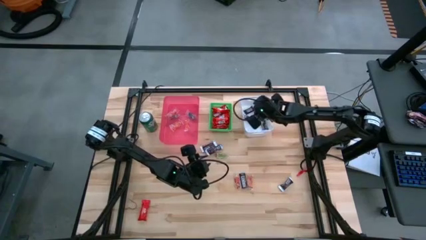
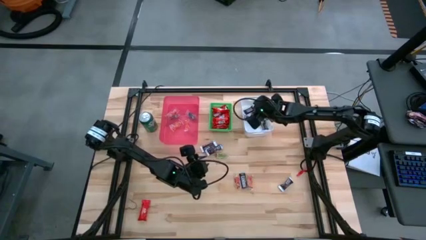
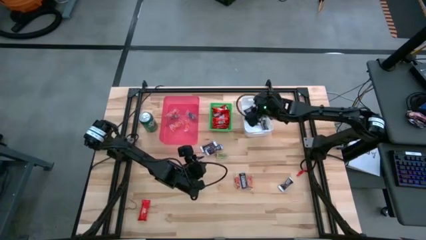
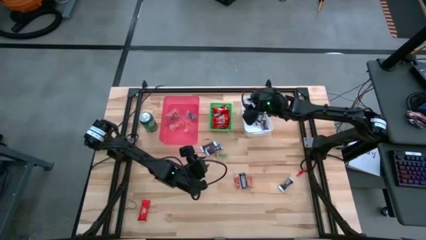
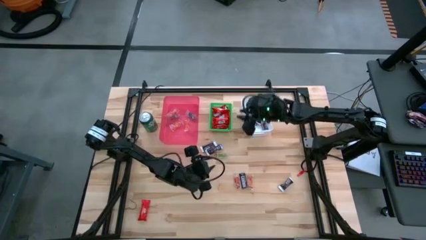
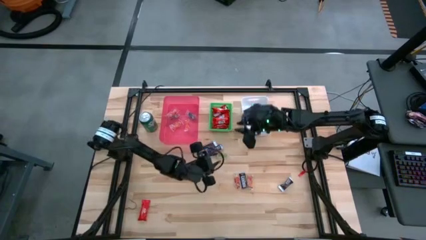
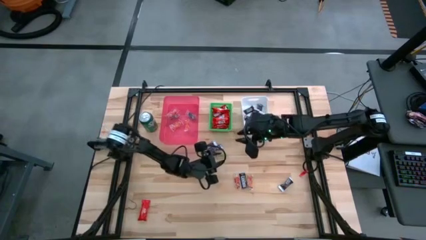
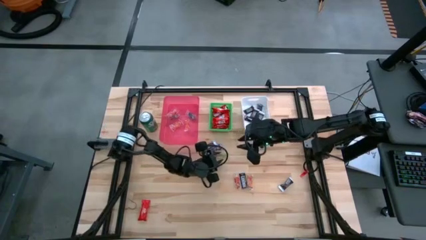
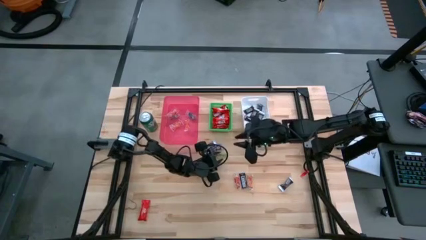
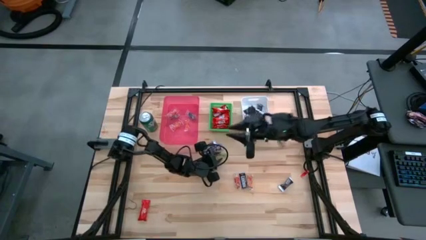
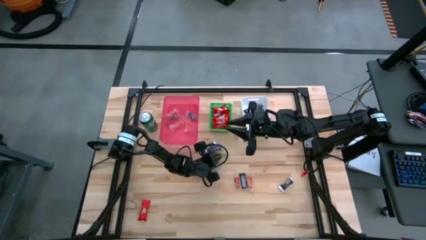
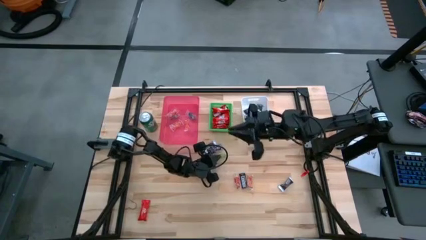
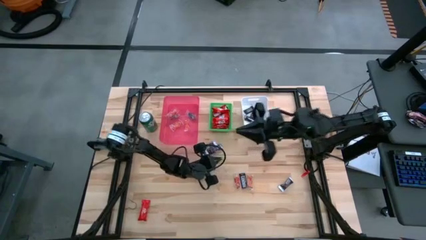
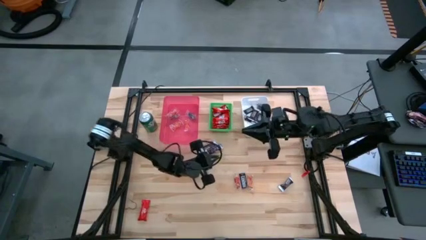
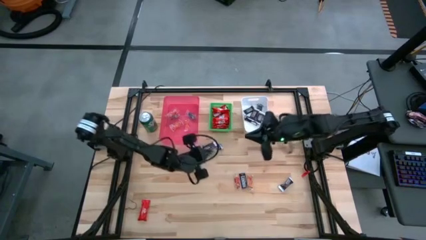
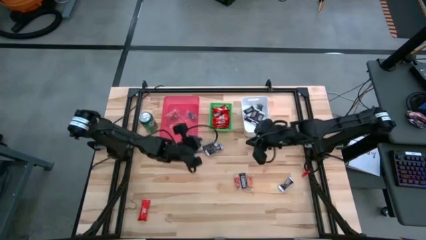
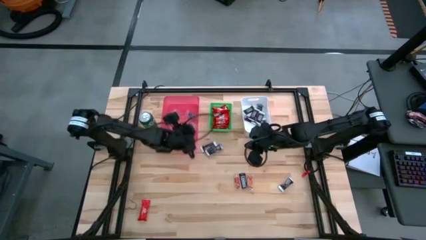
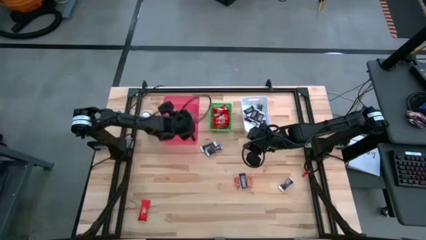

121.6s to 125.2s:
Task: Sort candy
Put the green gummy into the red bin

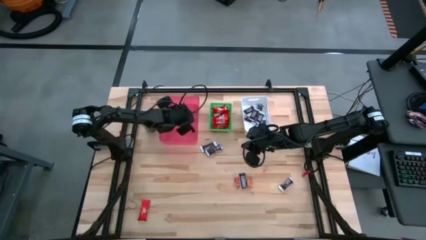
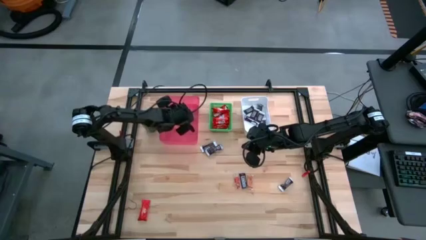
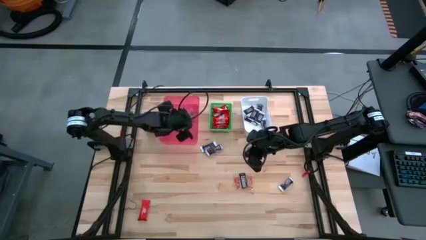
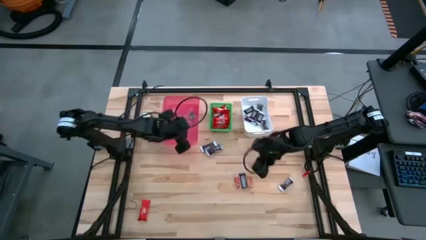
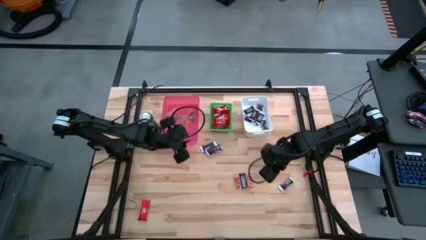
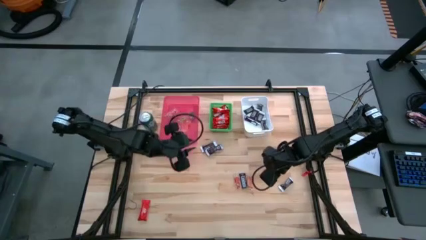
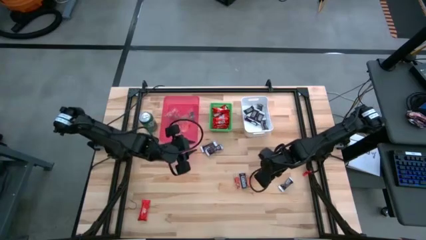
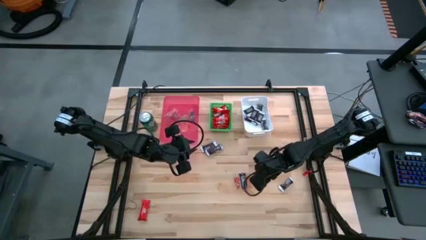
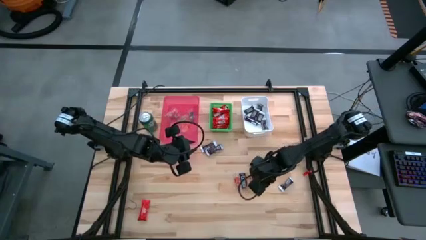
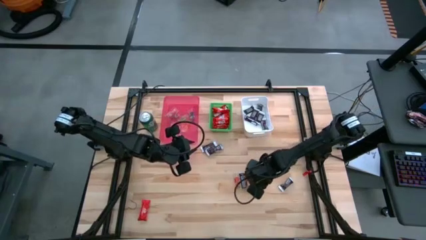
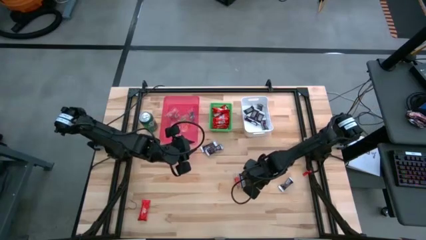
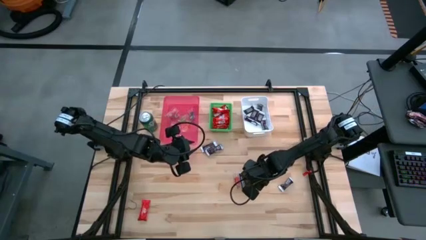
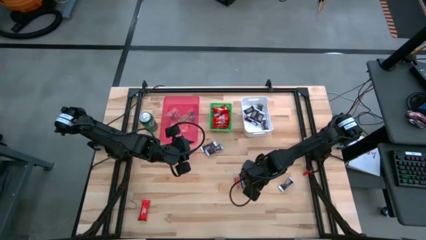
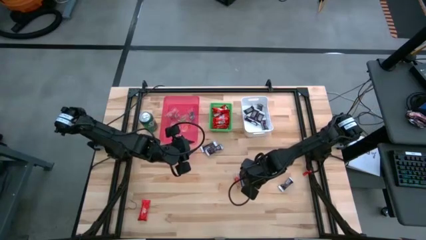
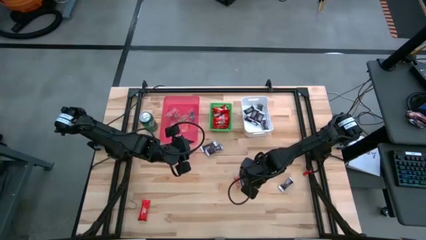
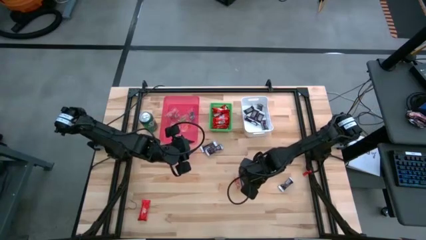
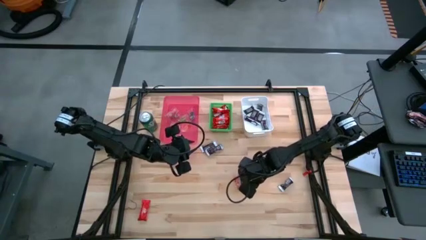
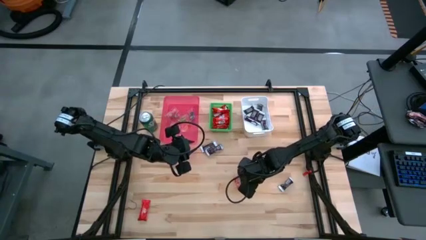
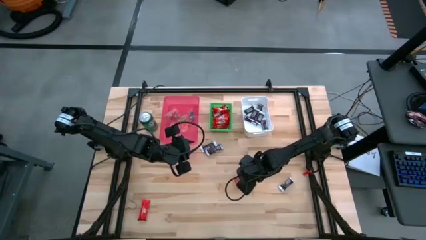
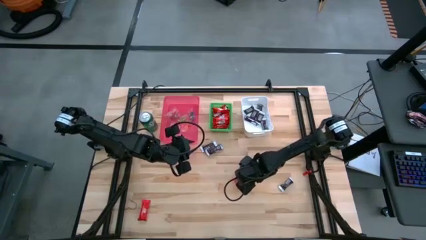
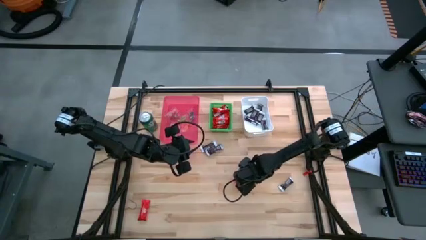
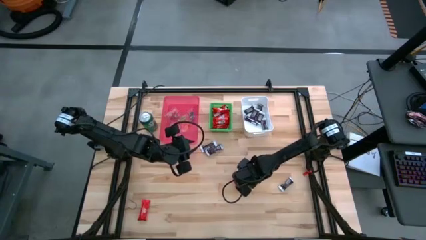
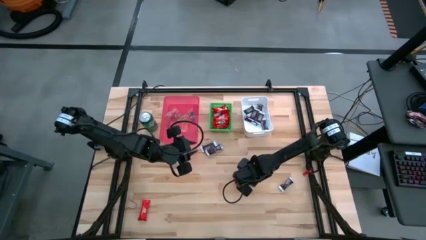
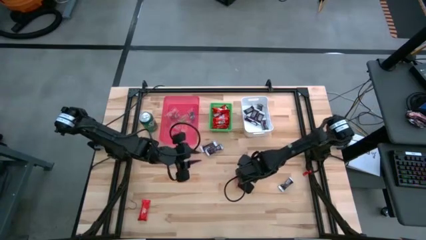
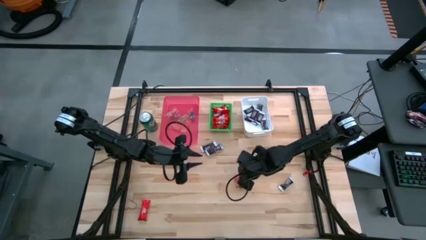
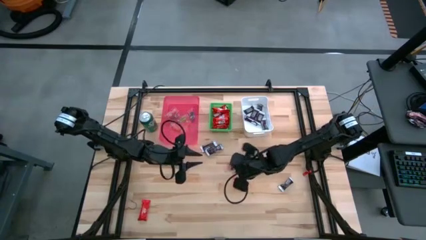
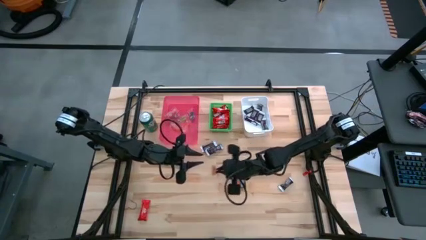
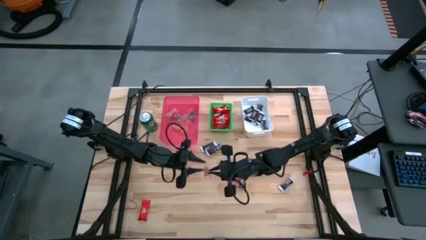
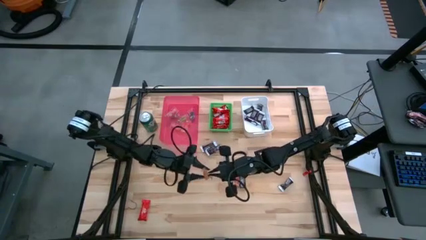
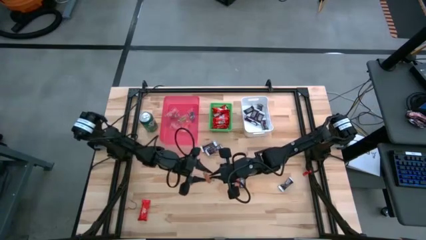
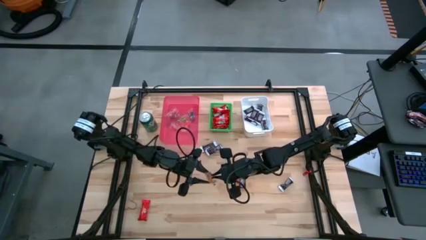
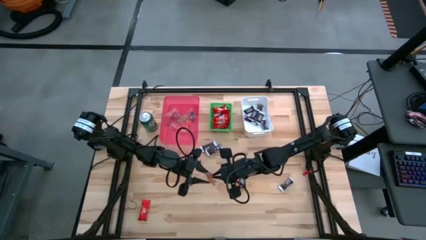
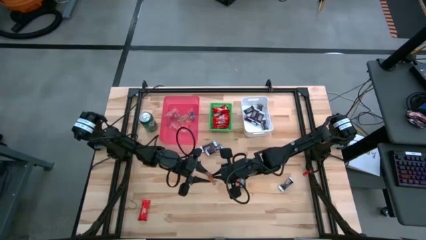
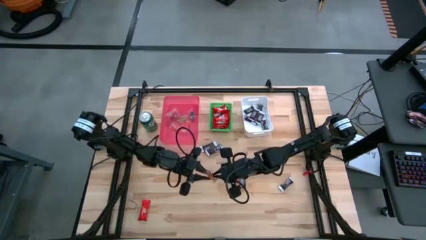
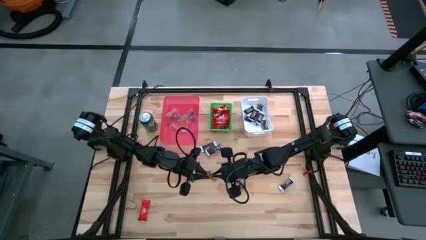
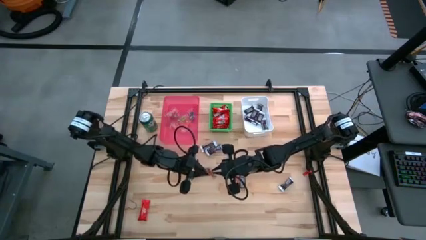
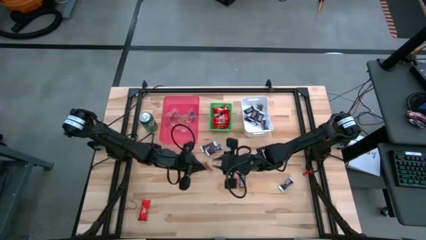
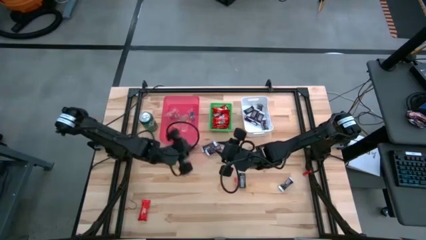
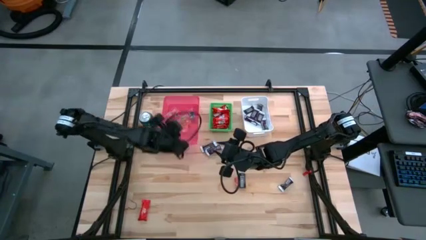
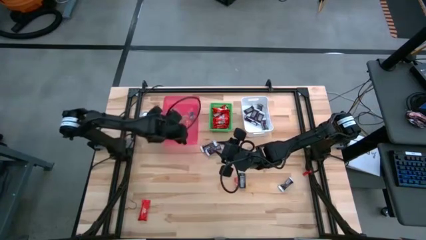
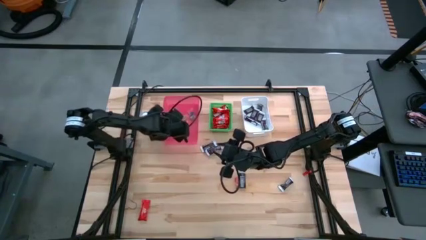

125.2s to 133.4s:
Put the orange gummy into the red bin
